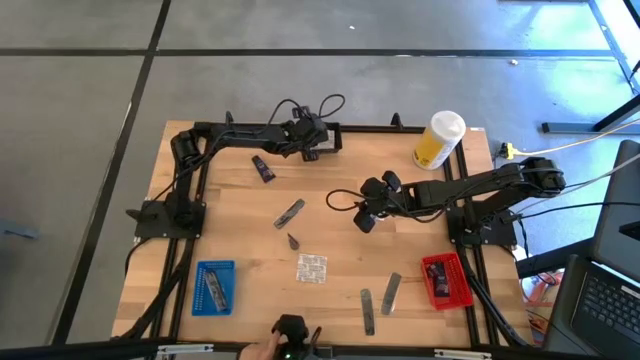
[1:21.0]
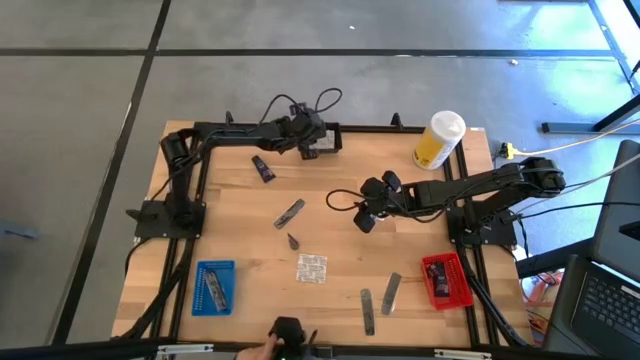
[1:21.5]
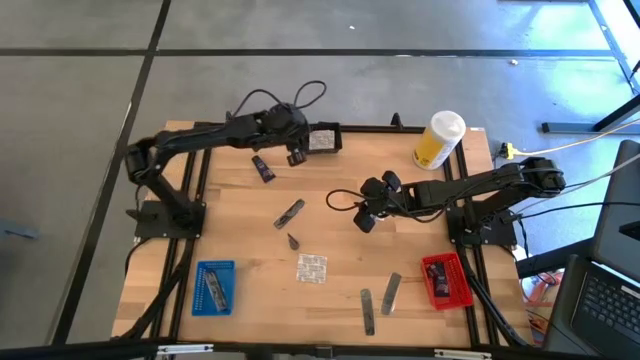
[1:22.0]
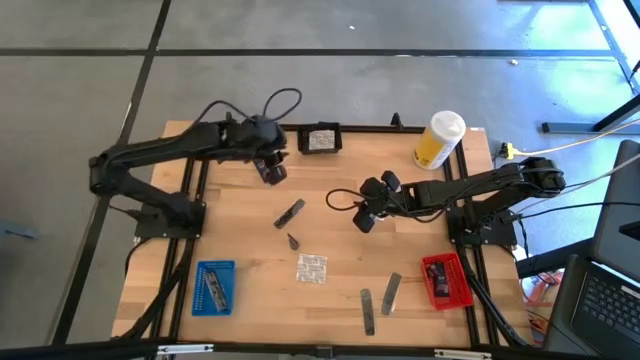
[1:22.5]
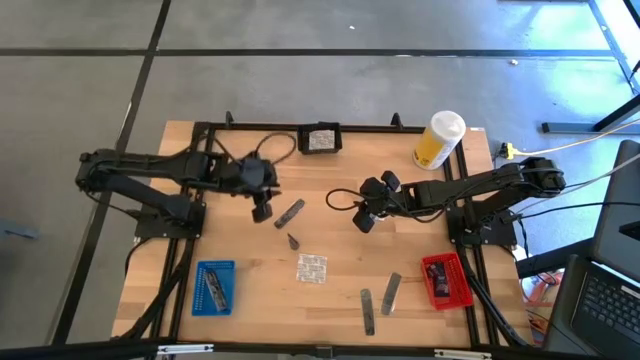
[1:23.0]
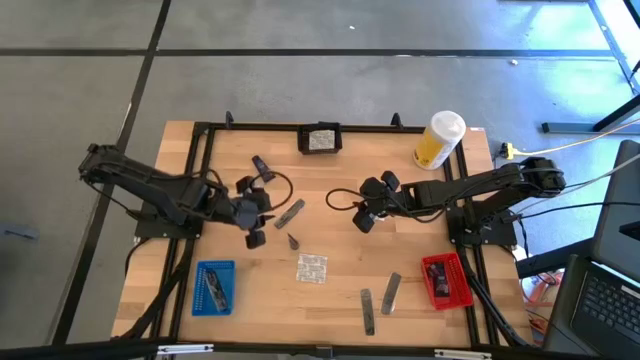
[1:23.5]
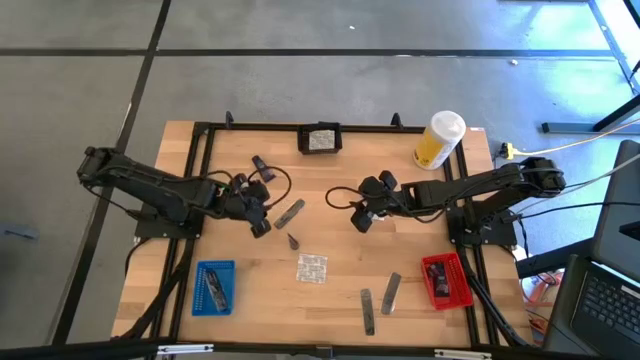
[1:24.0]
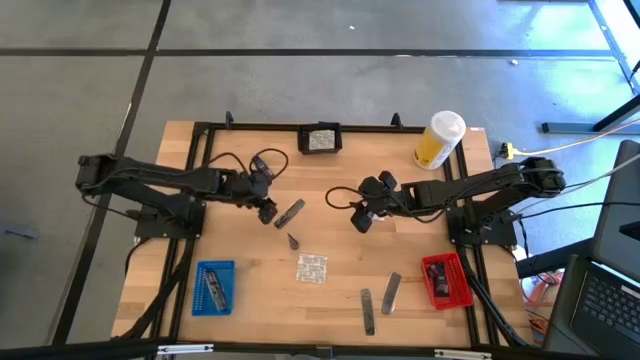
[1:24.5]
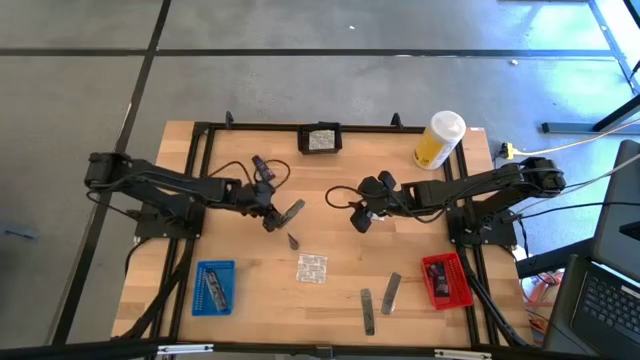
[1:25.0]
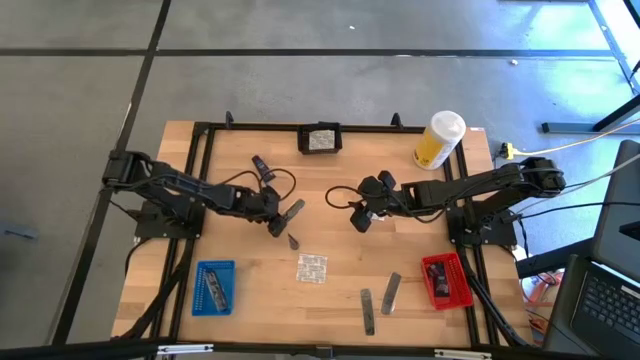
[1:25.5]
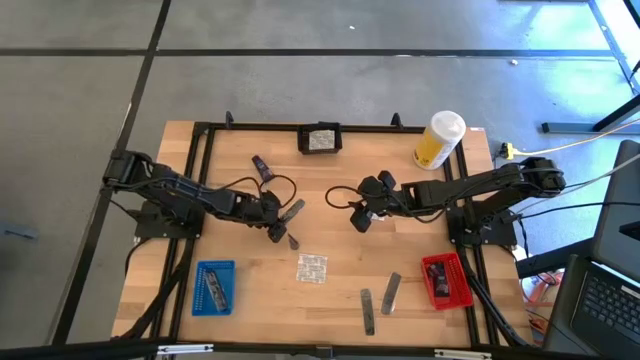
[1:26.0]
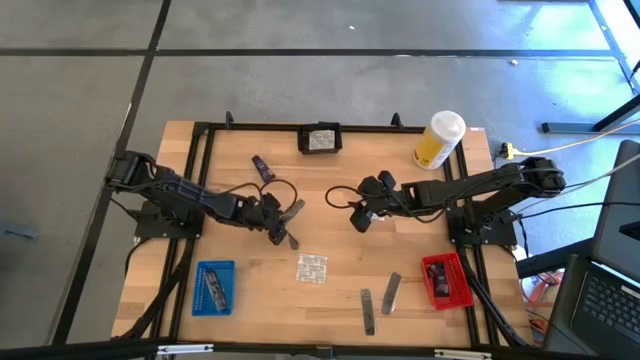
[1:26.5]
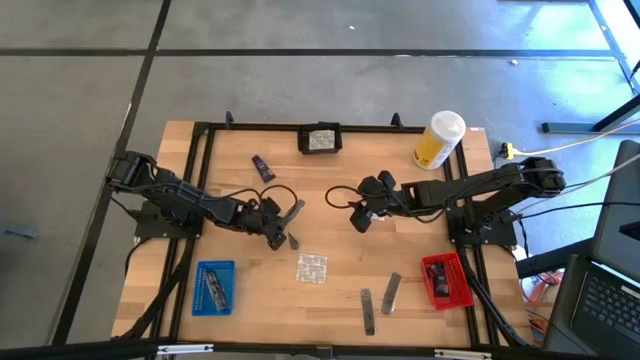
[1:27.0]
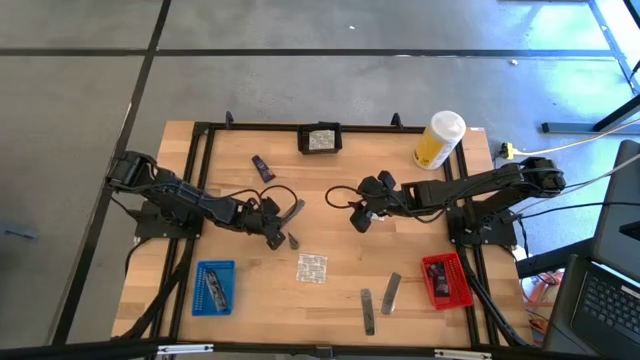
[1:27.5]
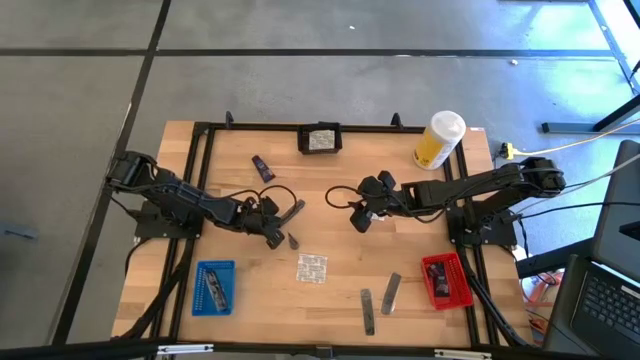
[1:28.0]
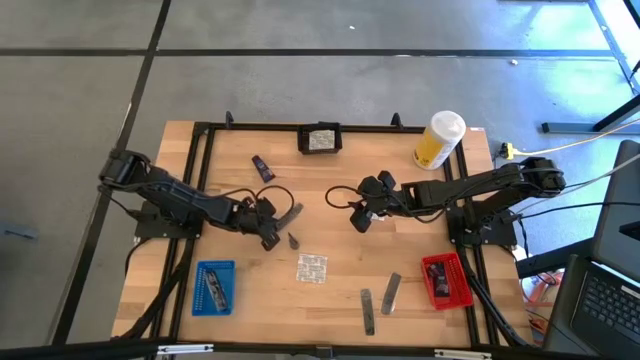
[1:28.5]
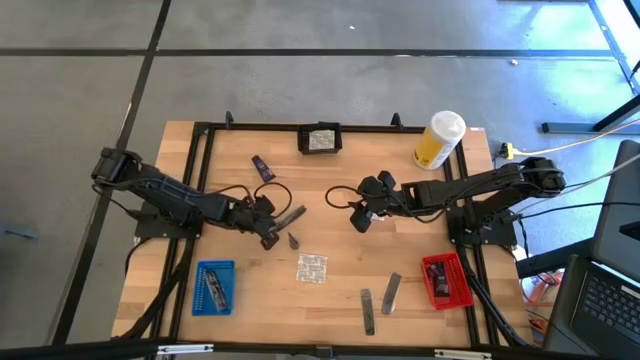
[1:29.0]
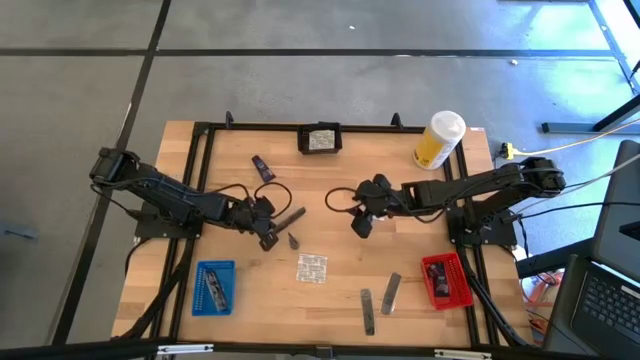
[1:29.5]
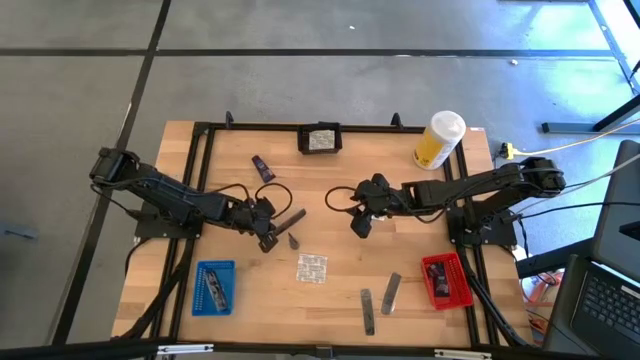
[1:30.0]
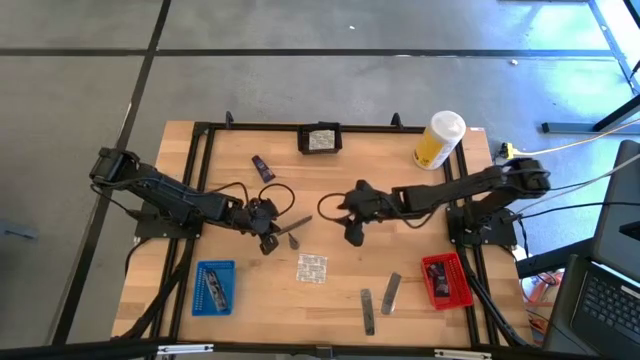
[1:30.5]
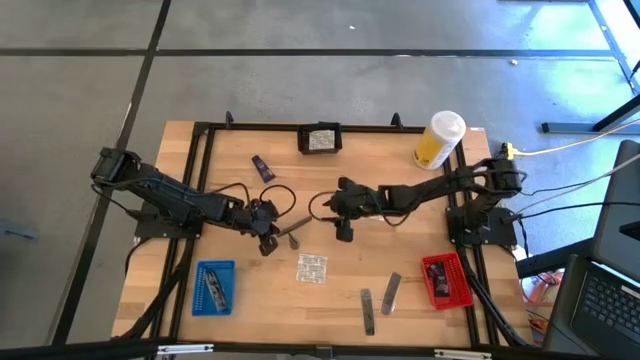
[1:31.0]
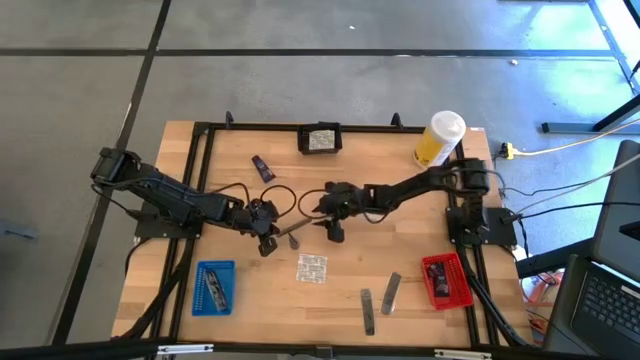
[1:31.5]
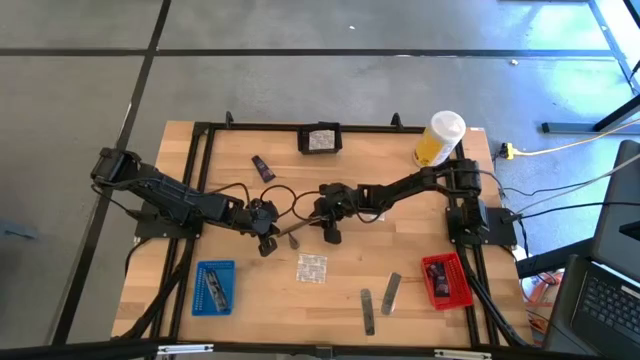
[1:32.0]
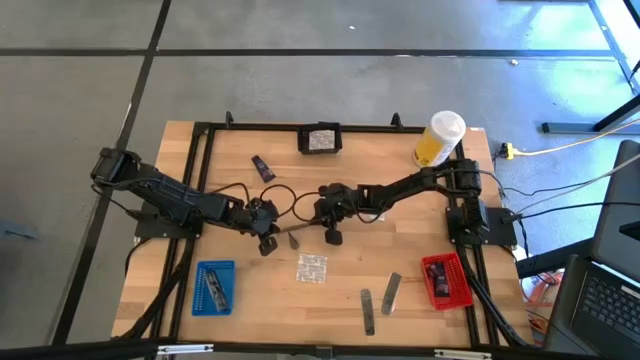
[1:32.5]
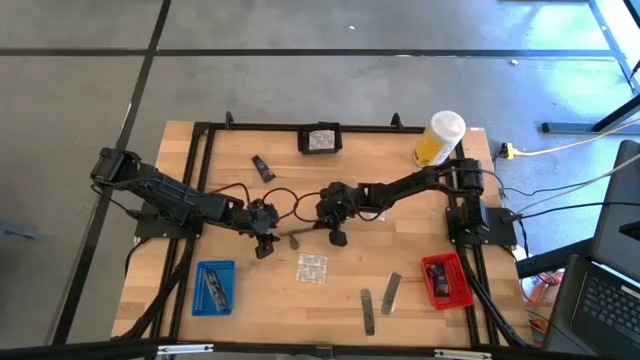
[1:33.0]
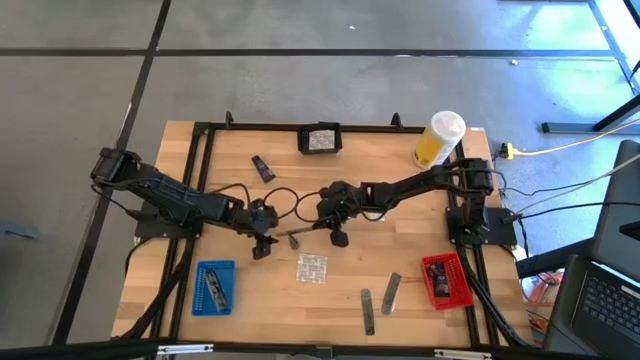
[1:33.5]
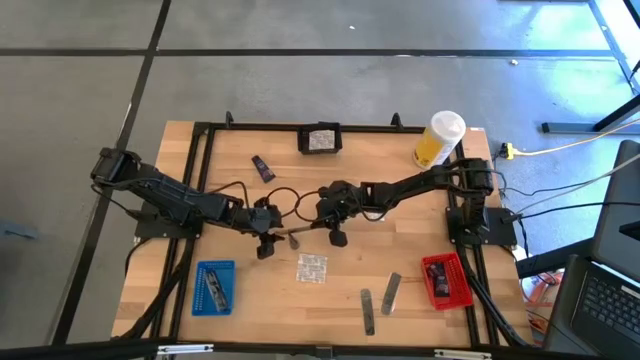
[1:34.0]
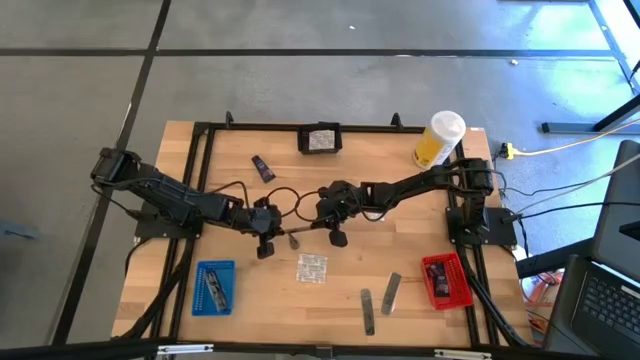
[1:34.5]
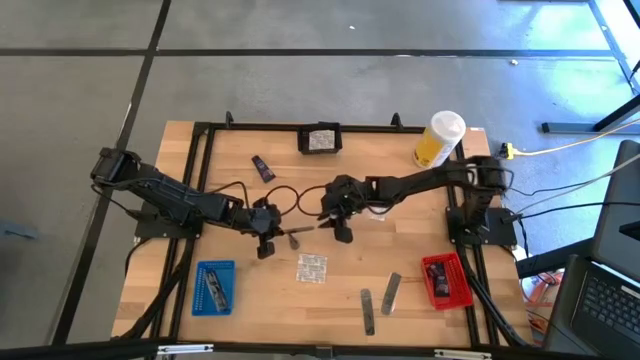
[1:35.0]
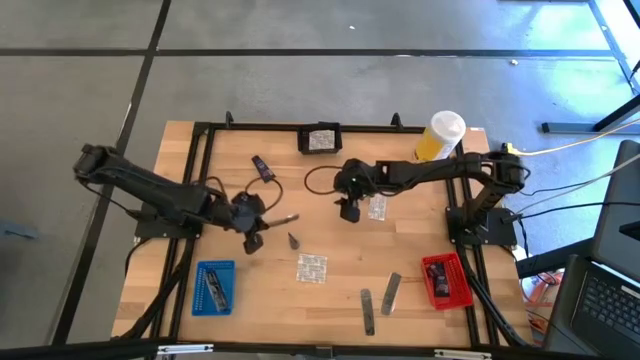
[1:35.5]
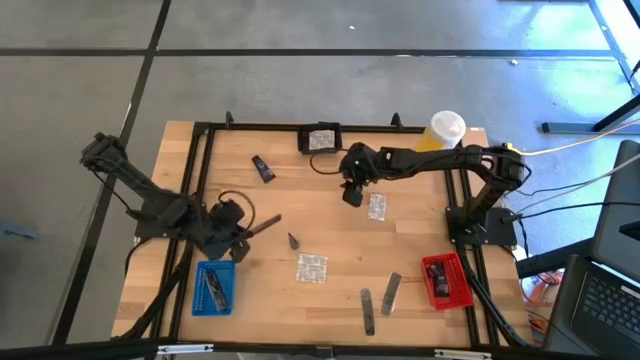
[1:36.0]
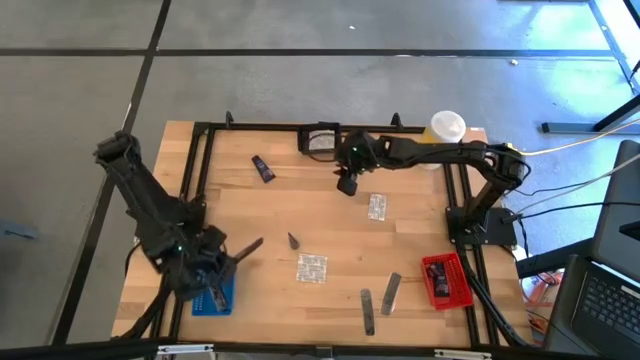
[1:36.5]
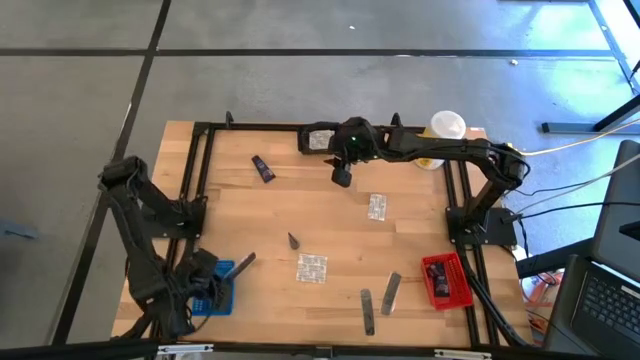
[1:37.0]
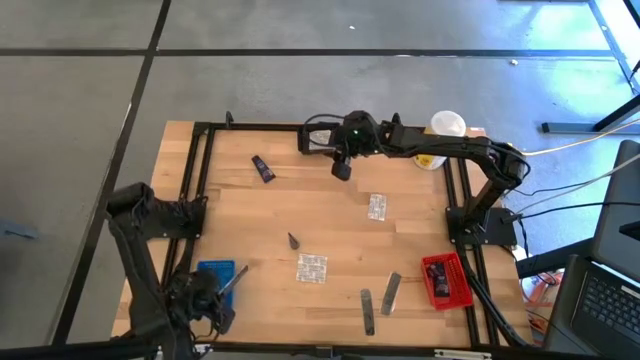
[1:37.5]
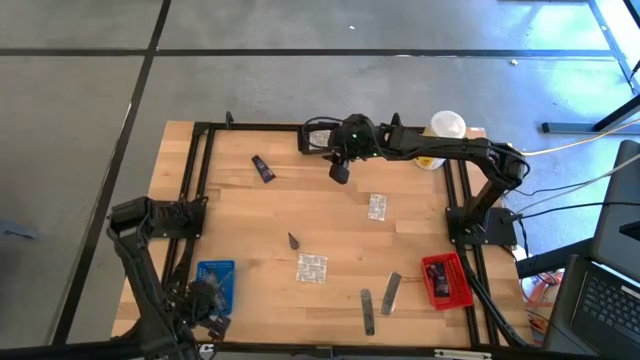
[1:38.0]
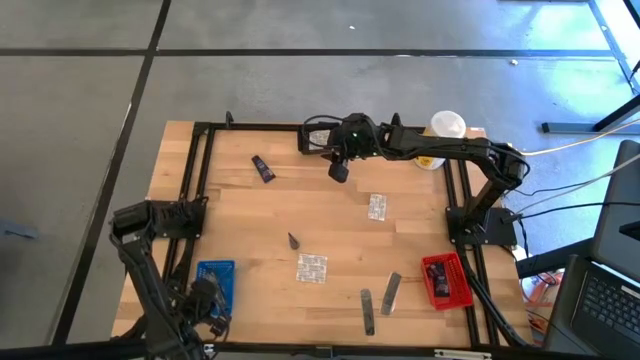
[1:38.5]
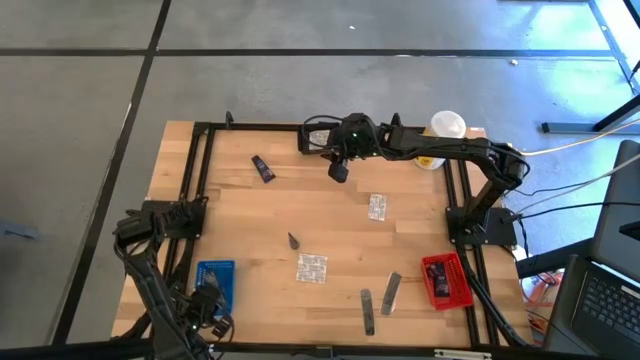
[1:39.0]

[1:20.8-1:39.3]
Task: Pick & Place Travel size toiletries
Put the black comb into the blue bin

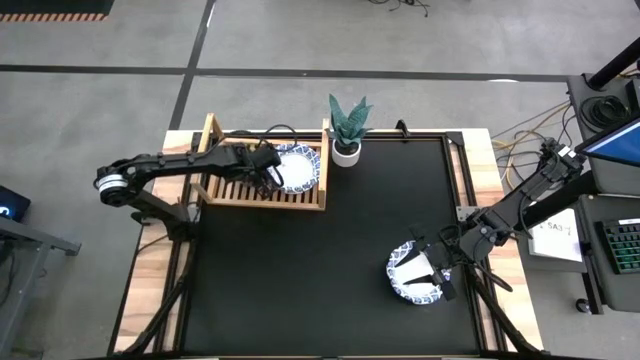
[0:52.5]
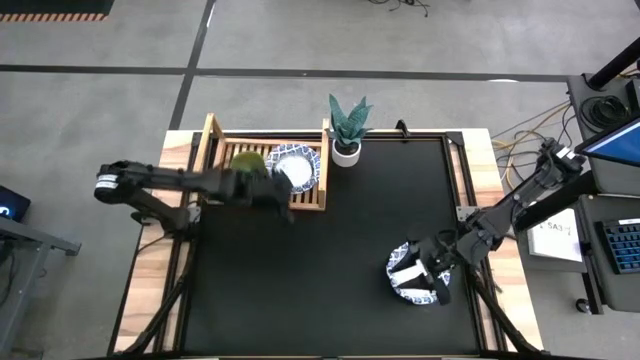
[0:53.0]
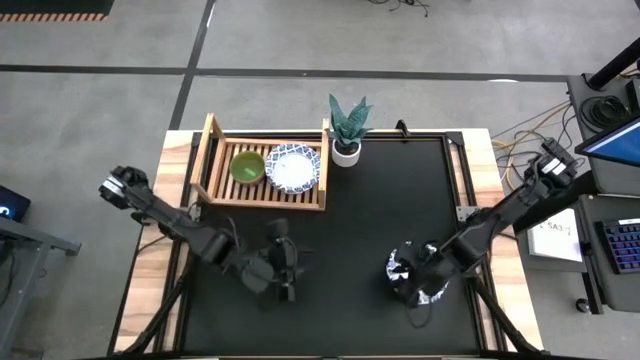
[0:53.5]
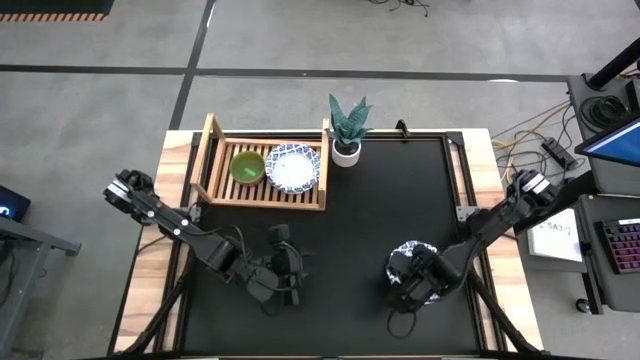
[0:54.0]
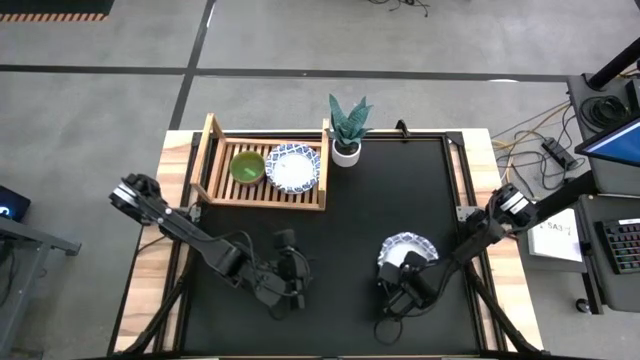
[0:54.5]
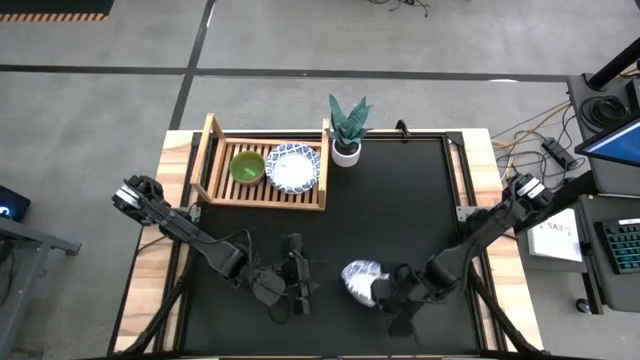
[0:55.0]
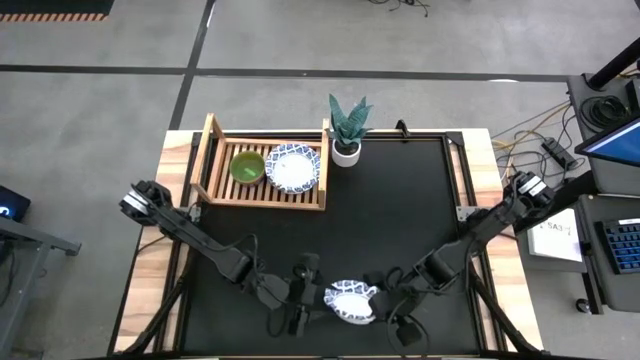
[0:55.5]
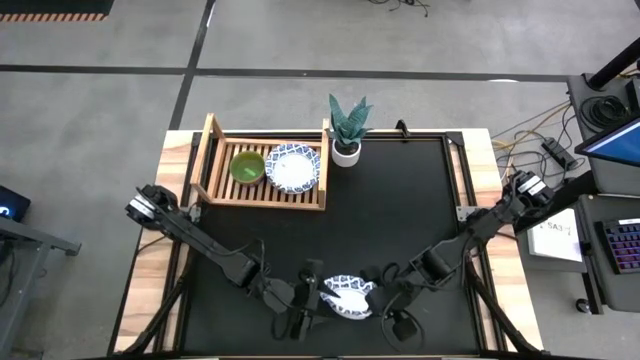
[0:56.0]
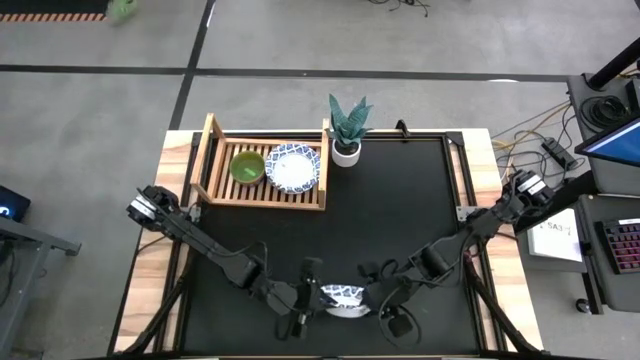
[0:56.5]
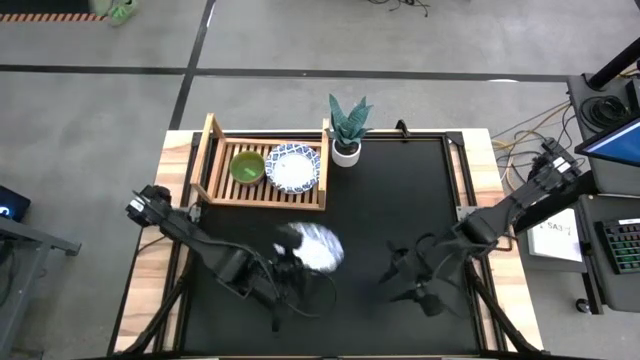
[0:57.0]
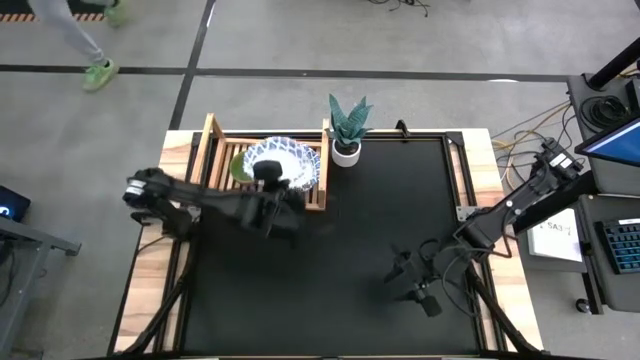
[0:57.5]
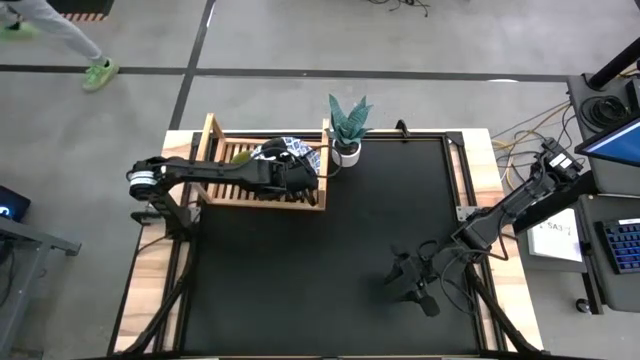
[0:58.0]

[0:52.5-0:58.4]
Task: Place and stack bowls onto a shelf
Stack the blue patterned bowl on top of the blue patterned bowl on the shelf
